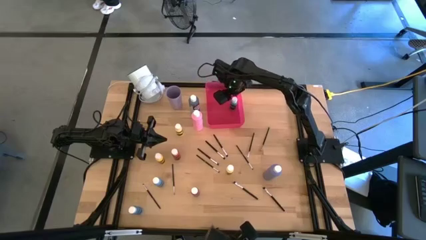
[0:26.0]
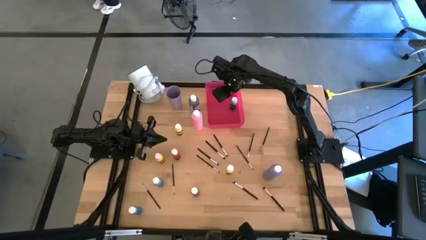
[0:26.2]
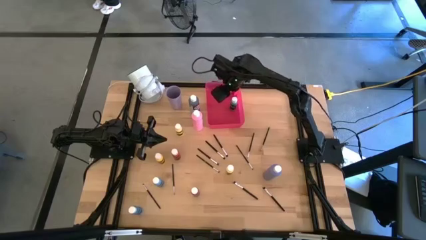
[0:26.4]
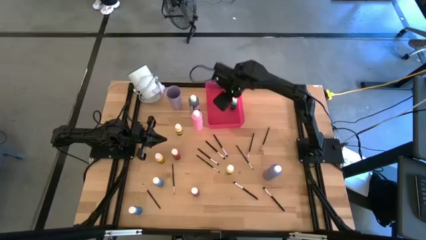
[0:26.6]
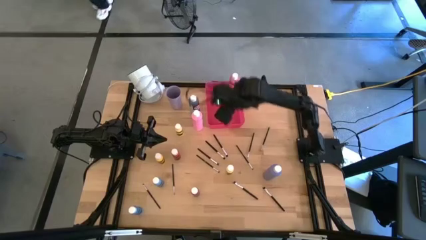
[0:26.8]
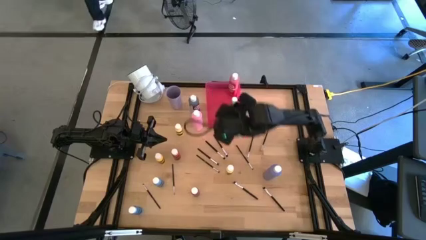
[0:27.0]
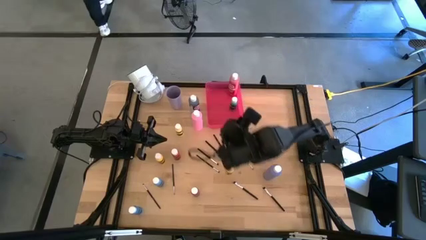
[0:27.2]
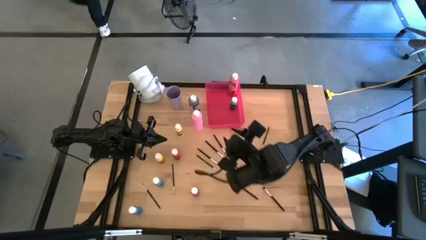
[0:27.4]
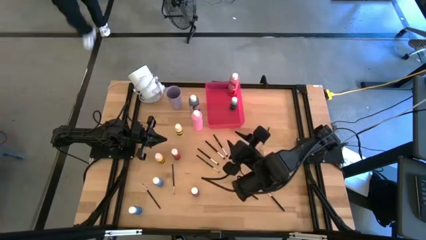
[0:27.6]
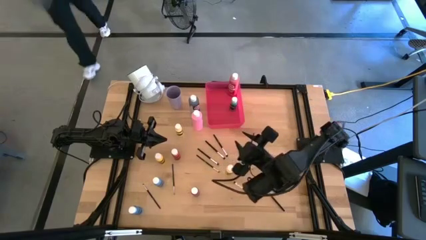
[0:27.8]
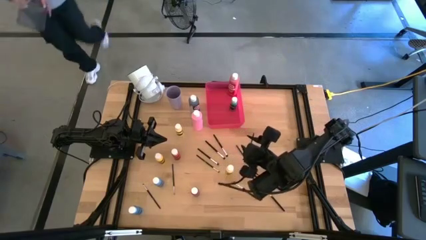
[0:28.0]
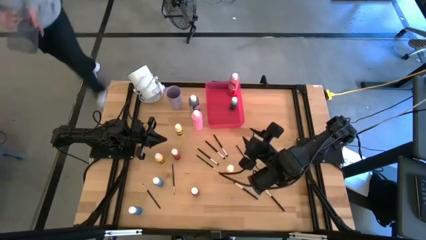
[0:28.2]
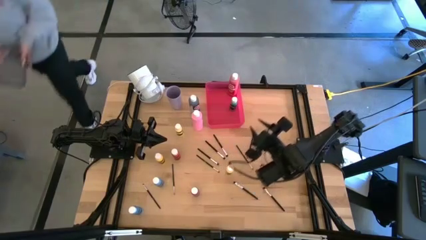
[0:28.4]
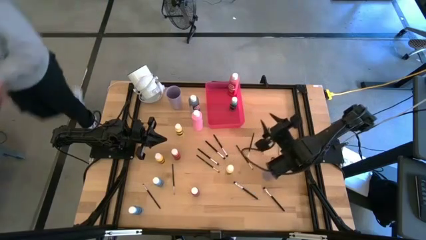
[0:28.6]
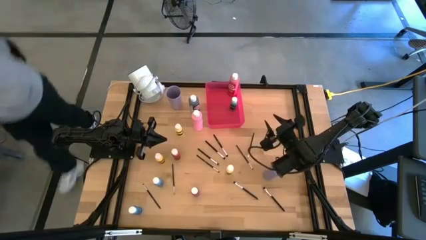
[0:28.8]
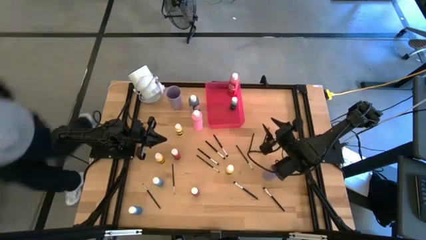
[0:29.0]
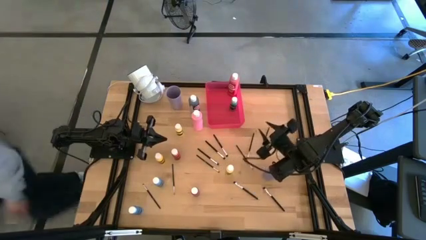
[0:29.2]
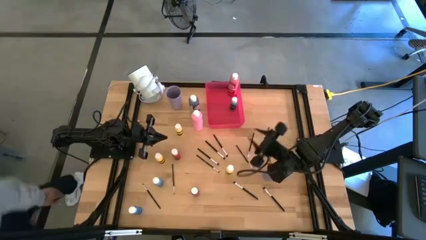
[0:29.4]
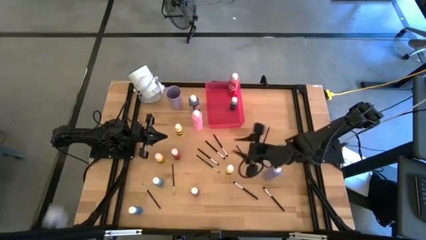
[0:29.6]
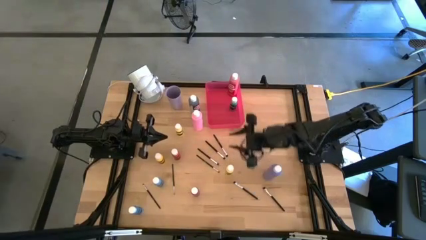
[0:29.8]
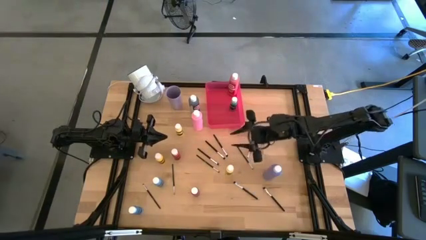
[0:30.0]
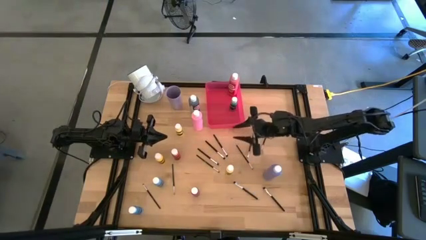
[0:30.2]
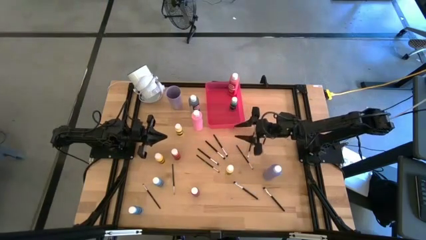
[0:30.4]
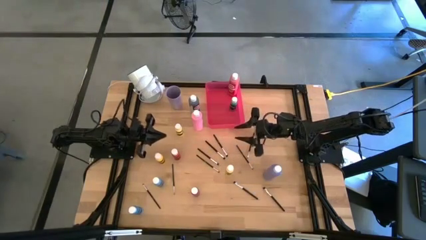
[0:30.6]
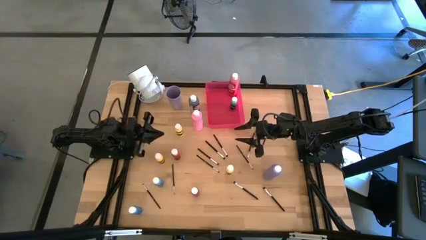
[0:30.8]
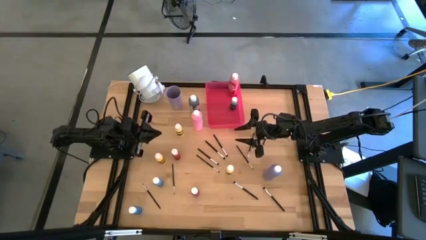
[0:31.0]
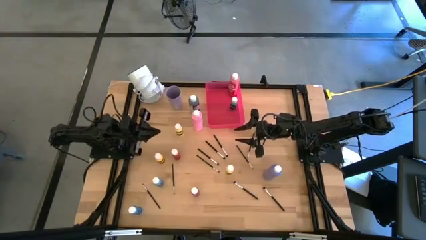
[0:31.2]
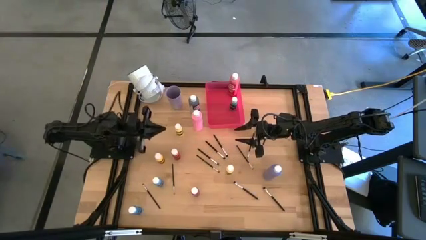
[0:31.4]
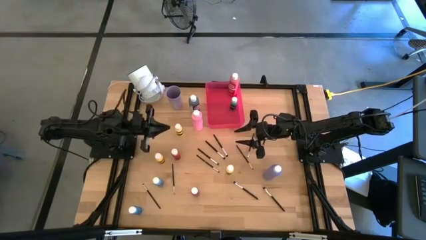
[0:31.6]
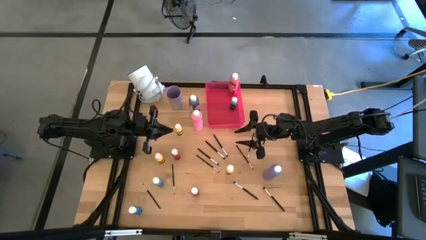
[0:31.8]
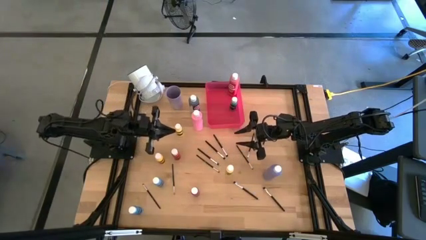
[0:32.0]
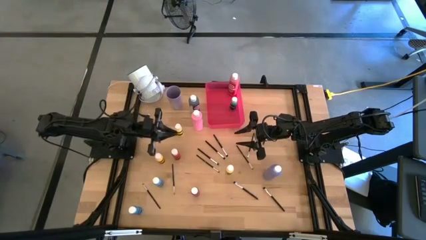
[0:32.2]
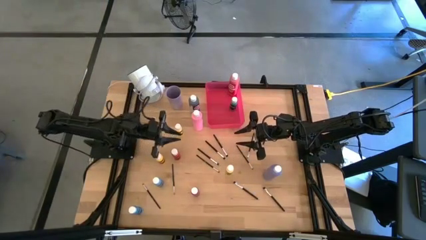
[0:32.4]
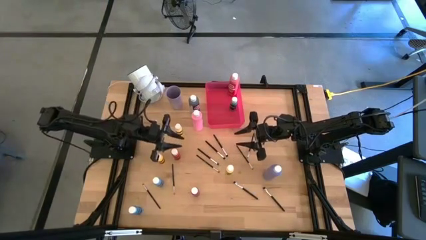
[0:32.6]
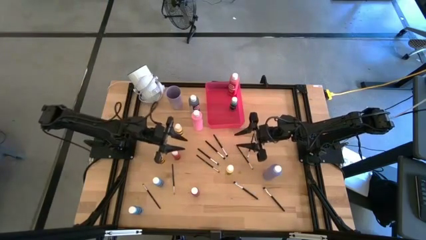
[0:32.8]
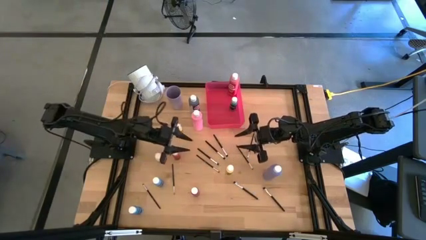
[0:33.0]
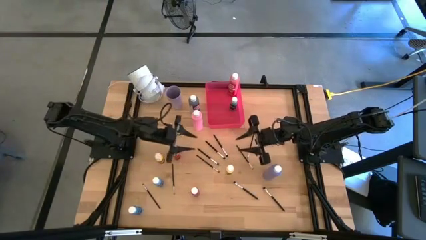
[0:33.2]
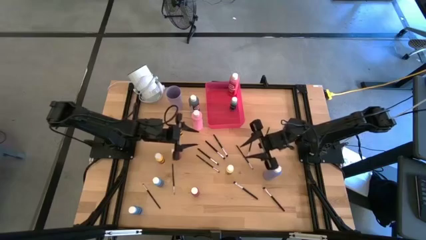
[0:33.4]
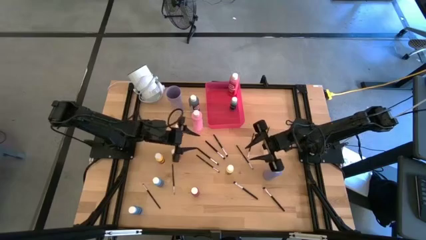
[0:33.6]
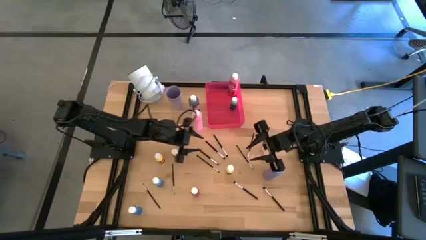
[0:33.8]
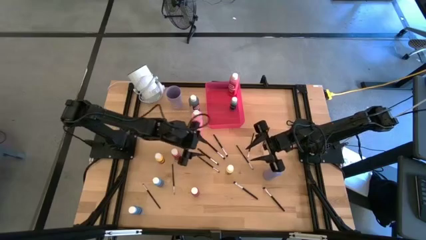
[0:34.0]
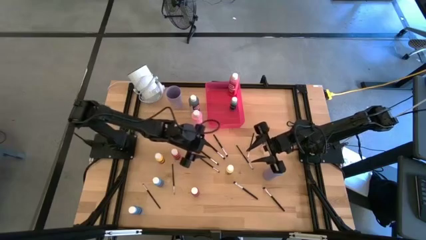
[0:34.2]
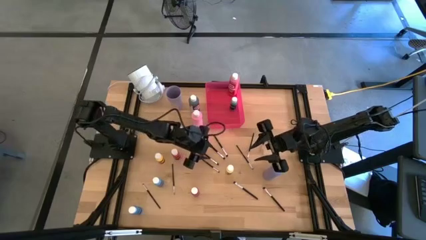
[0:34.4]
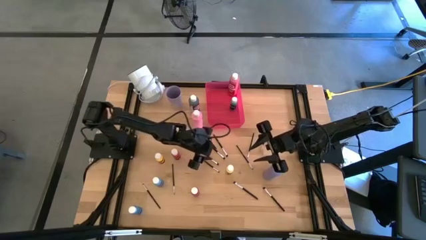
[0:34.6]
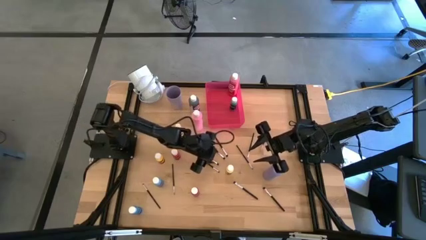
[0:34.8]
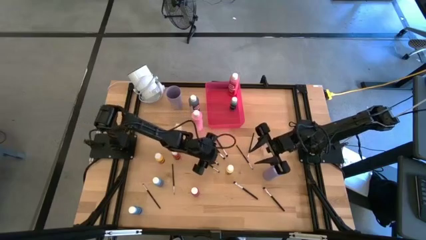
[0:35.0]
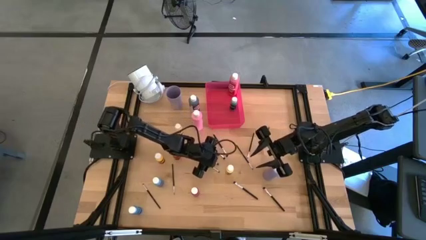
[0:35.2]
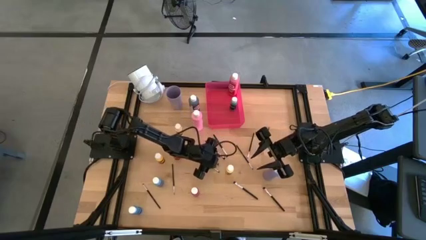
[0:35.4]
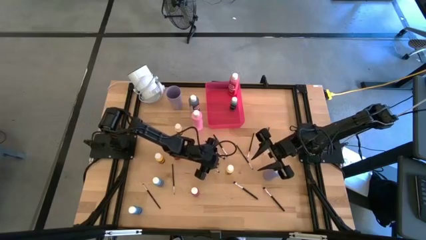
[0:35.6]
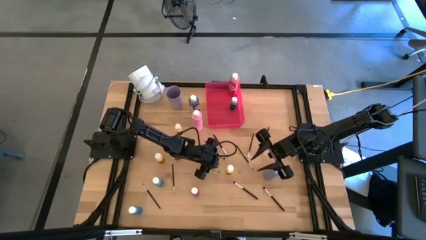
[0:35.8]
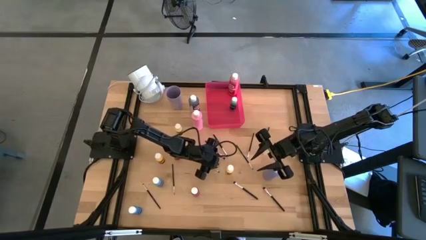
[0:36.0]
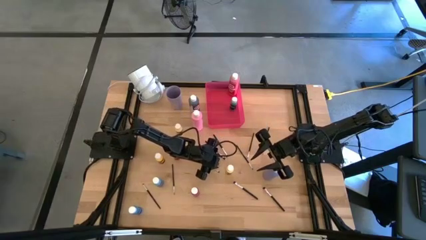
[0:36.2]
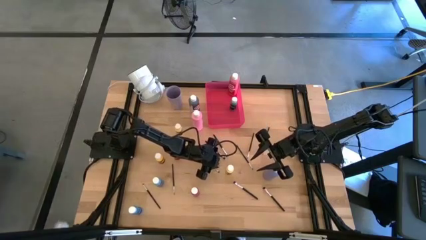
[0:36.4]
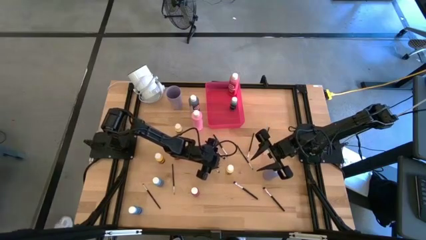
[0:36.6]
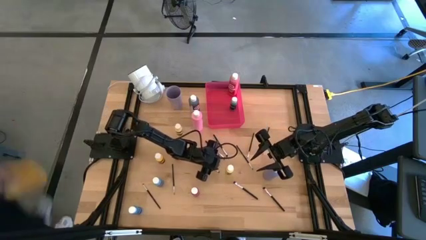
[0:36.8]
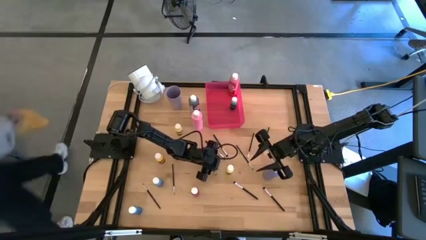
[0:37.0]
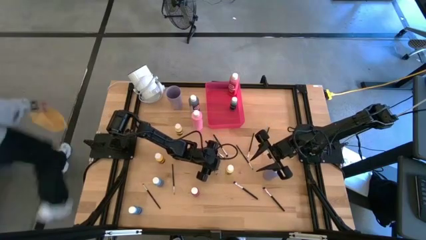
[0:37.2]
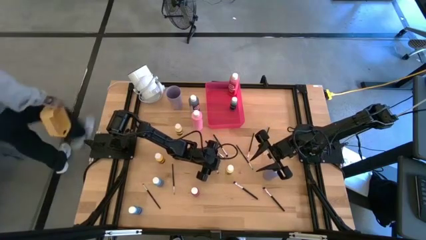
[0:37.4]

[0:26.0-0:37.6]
Task: Pick & Place Paint Supplies
Put the black paint brush into the purple cup

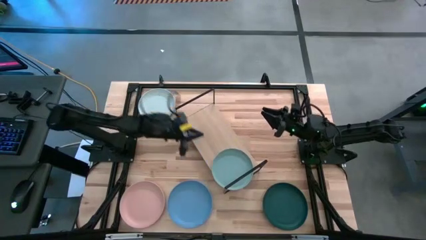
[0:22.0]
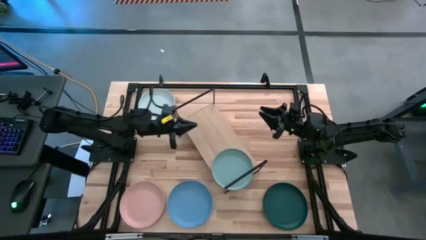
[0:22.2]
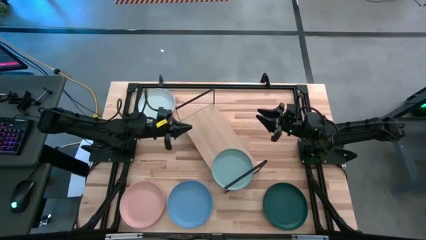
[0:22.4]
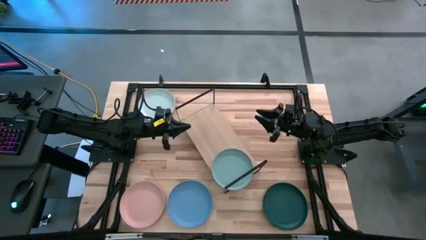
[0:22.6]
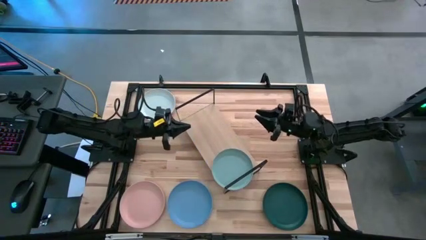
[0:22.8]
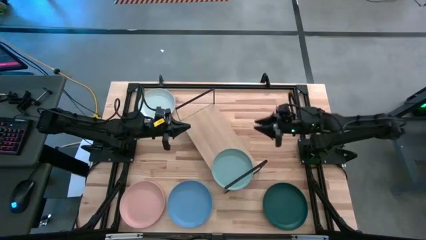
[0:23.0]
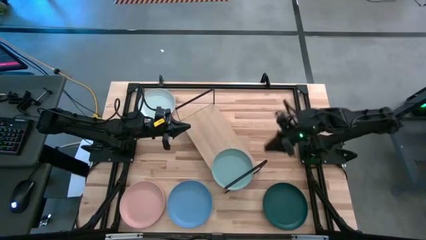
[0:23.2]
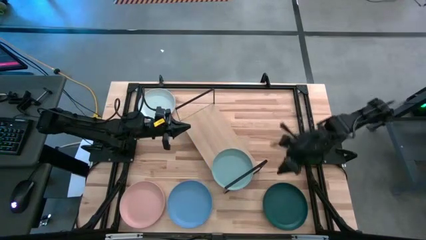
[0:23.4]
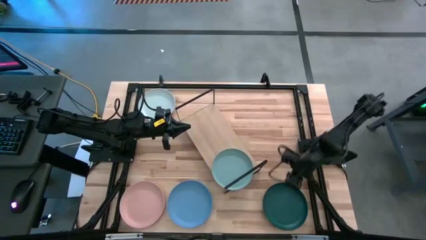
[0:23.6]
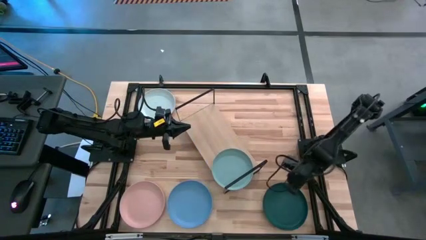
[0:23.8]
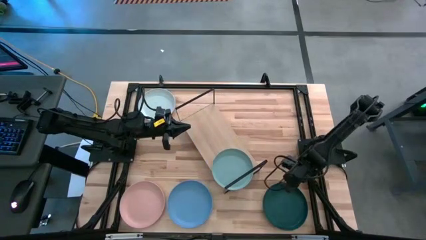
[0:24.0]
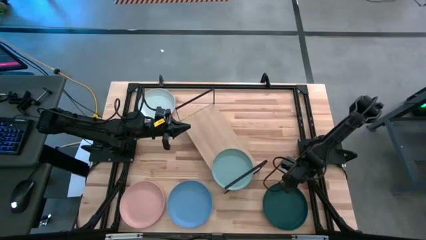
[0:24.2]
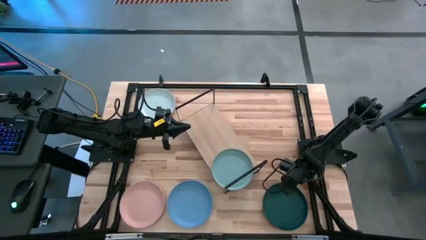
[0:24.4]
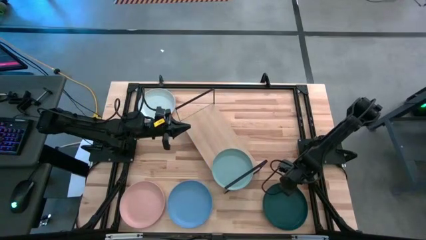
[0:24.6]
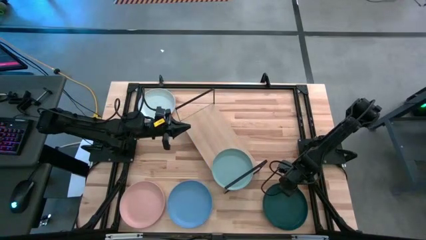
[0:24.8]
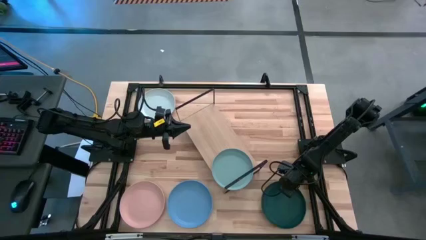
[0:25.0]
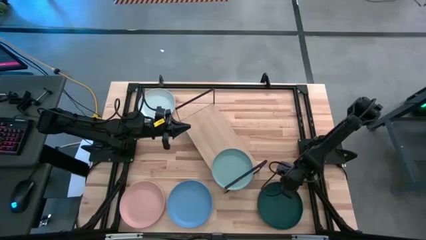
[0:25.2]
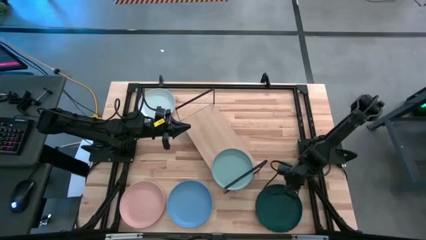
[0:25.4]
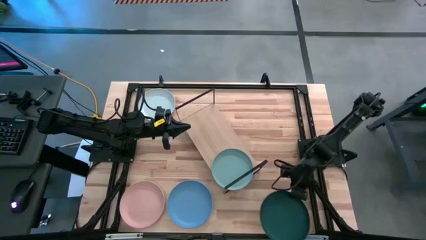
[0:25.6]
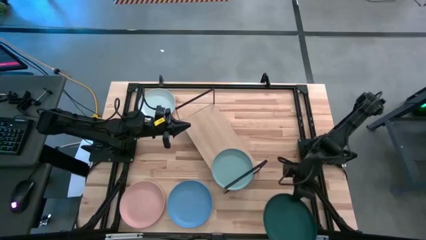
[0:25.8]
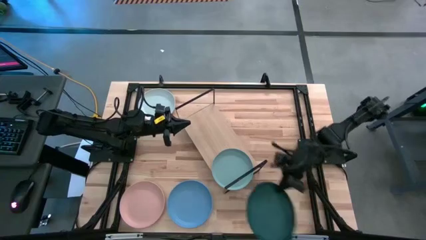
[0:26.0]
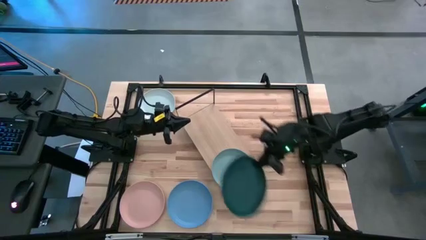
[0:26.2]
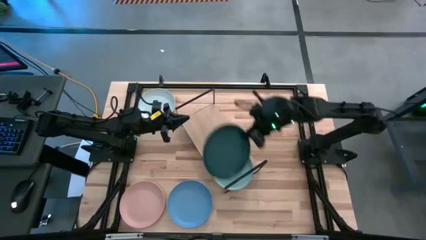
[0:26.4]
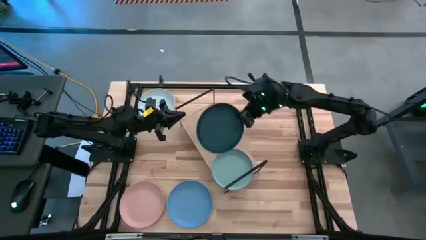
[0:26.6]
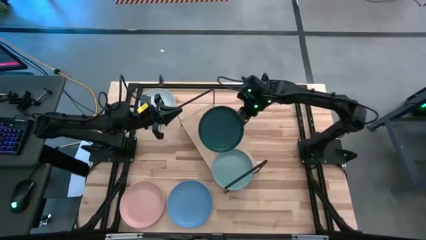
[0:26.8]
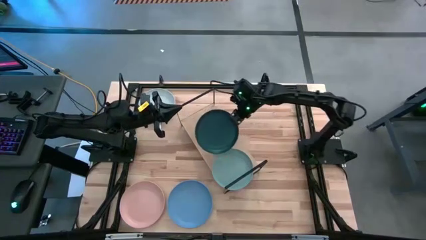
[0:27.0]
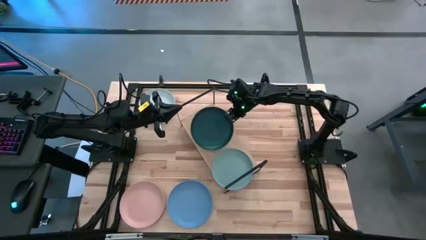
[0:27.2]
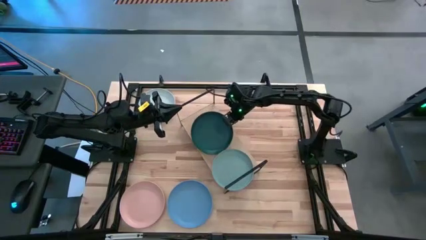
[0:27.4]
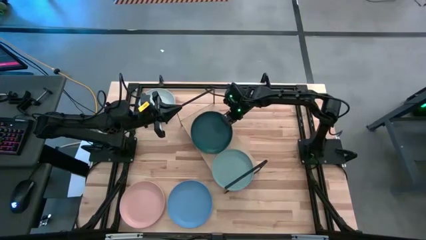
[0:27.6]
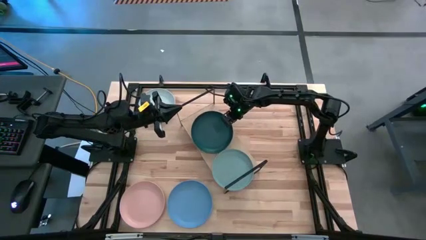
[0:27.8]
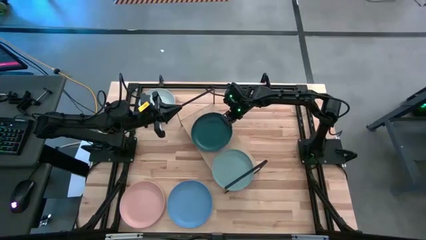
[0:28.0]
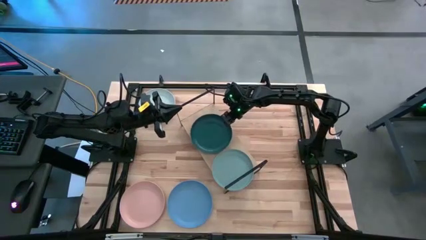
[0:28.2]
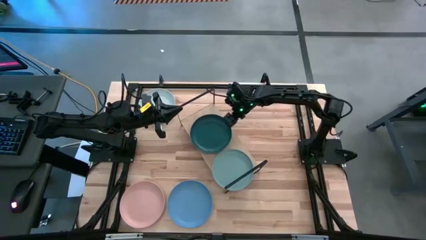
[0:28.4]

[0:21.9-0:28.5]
Task: Place and stack plates onto a shelf
Put the green plate on the shelf
